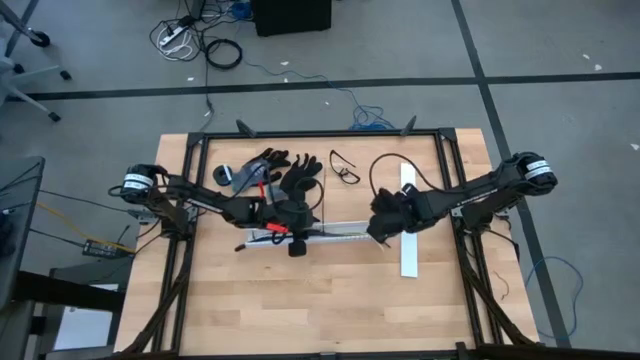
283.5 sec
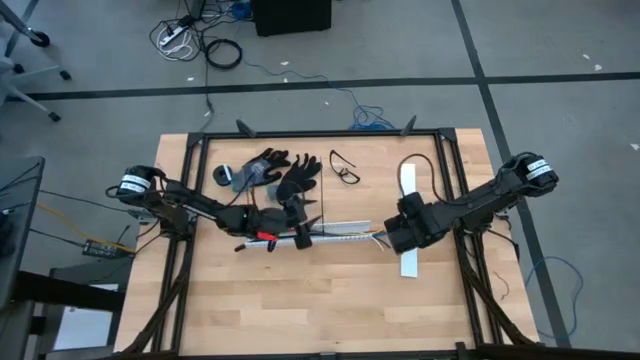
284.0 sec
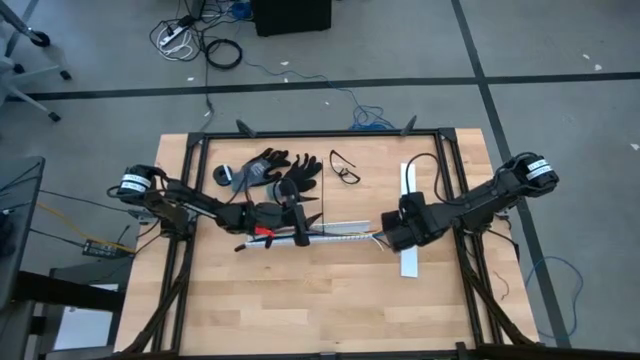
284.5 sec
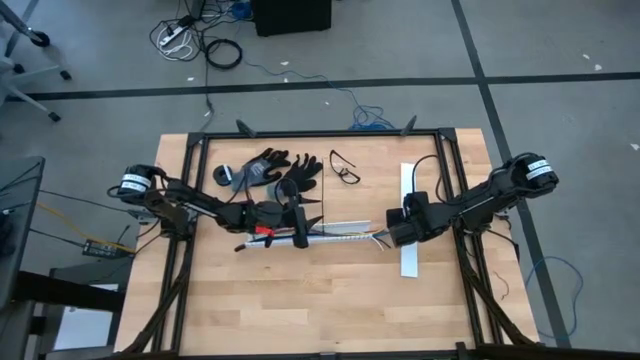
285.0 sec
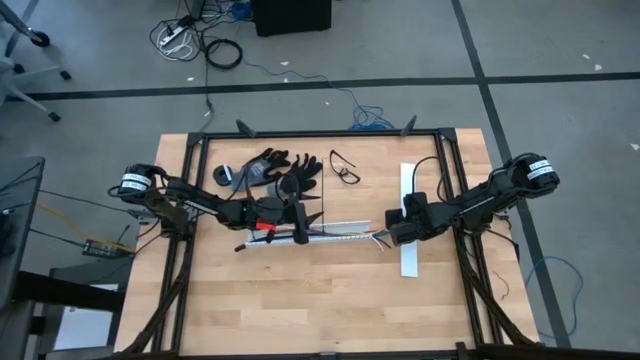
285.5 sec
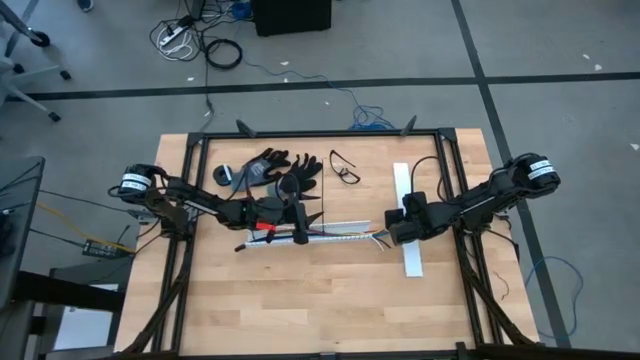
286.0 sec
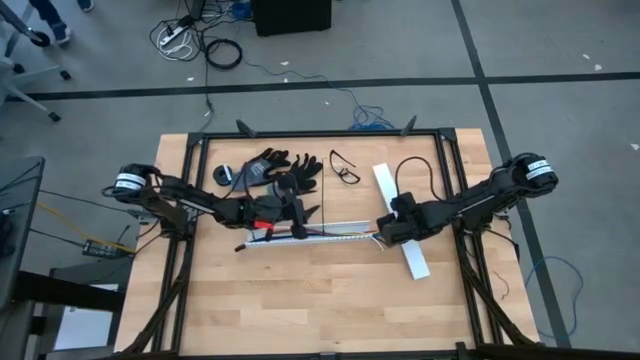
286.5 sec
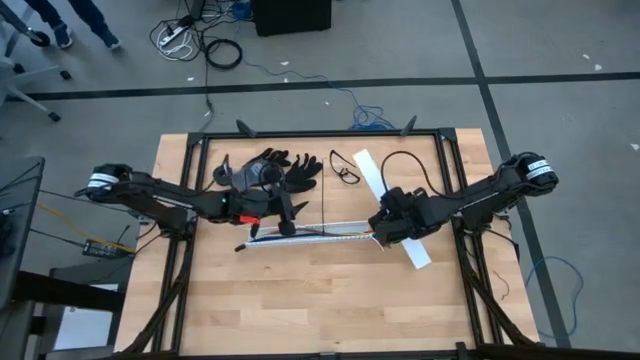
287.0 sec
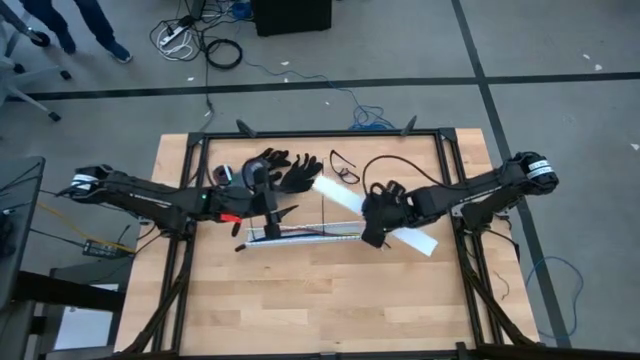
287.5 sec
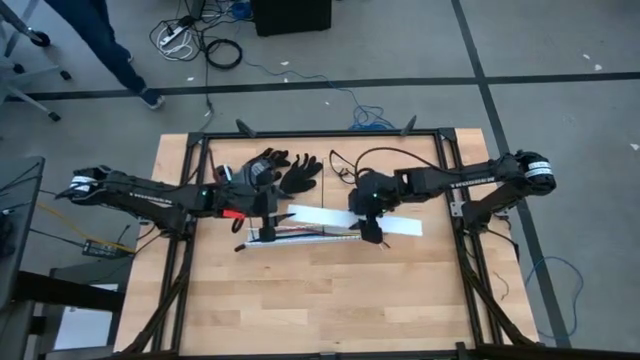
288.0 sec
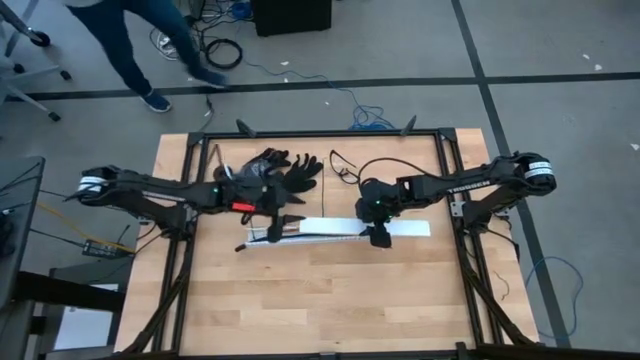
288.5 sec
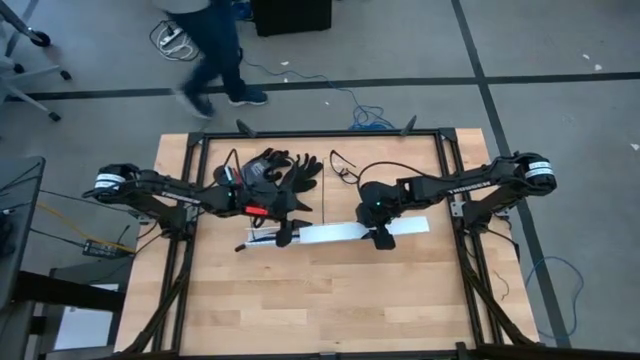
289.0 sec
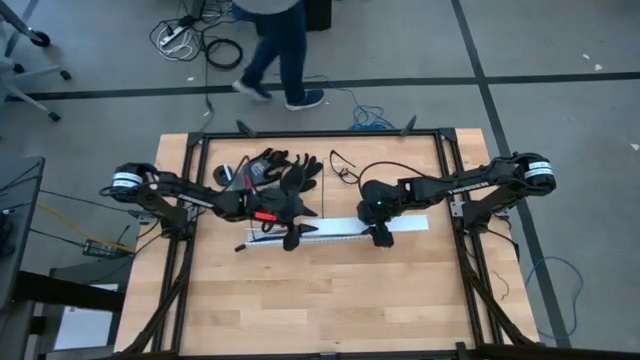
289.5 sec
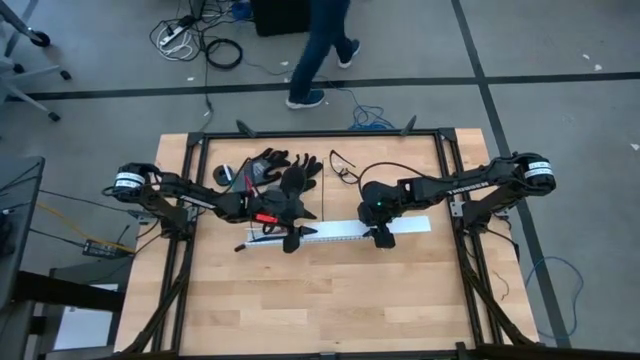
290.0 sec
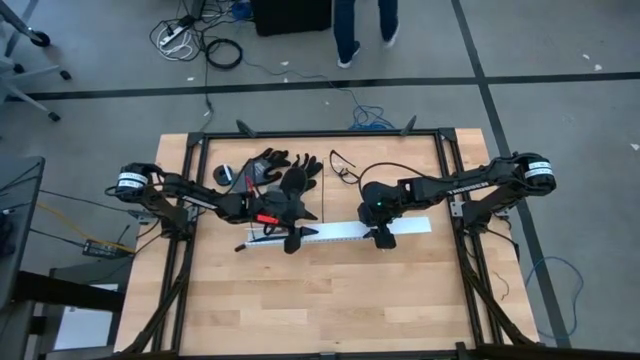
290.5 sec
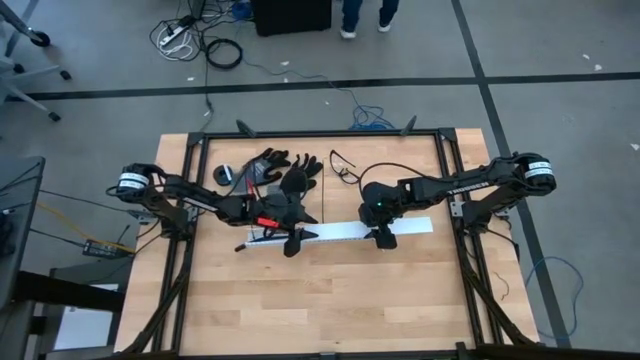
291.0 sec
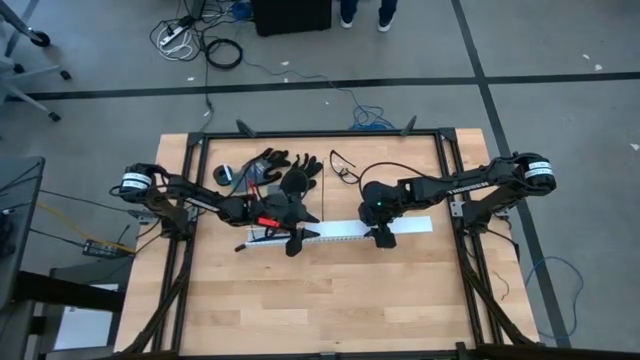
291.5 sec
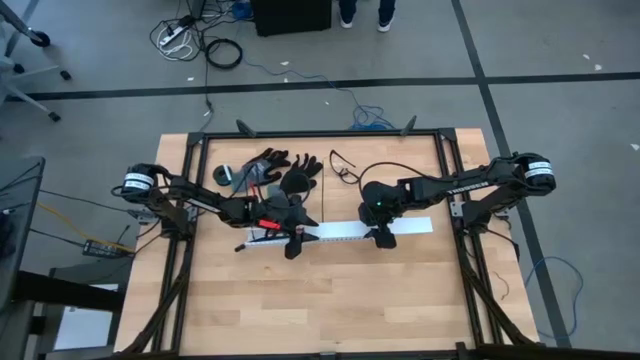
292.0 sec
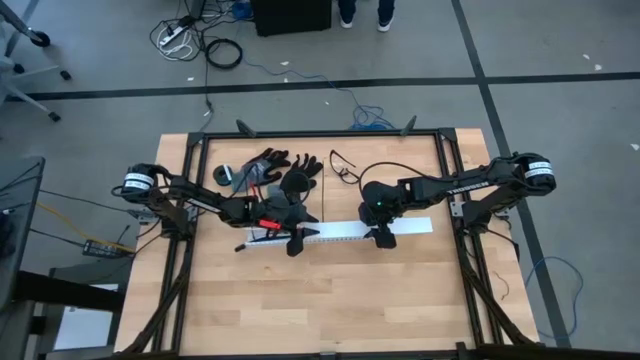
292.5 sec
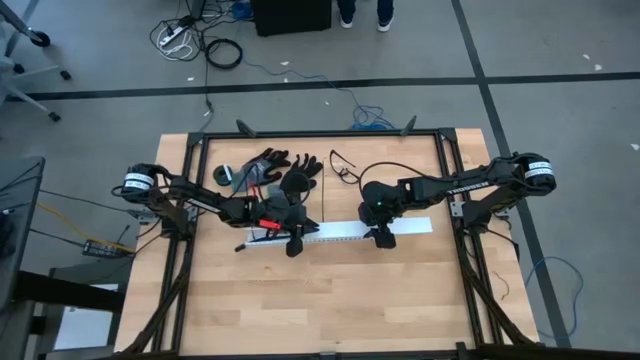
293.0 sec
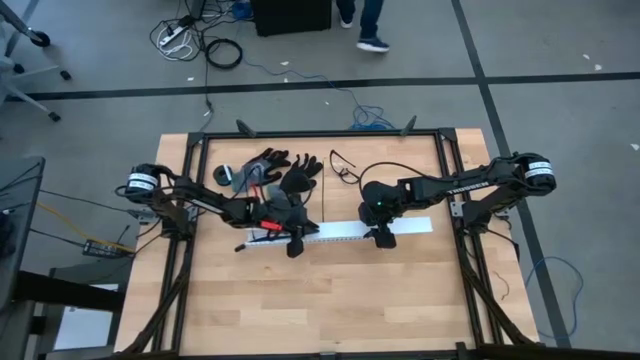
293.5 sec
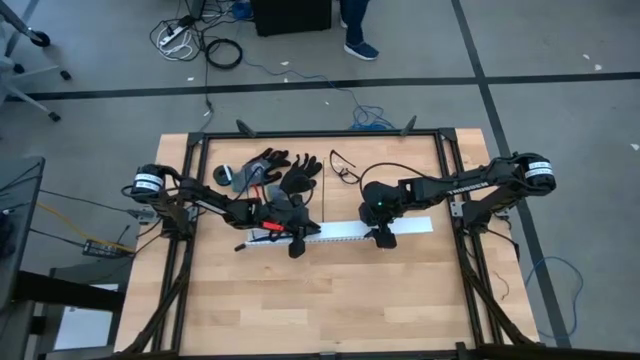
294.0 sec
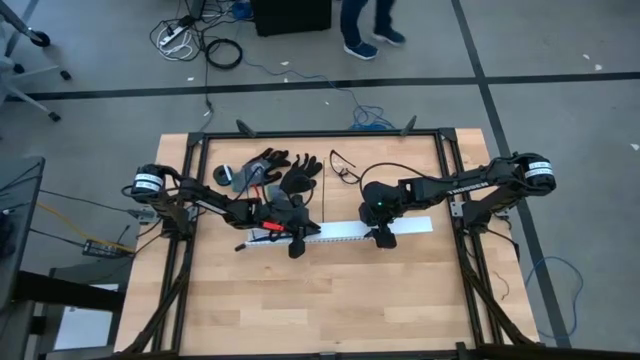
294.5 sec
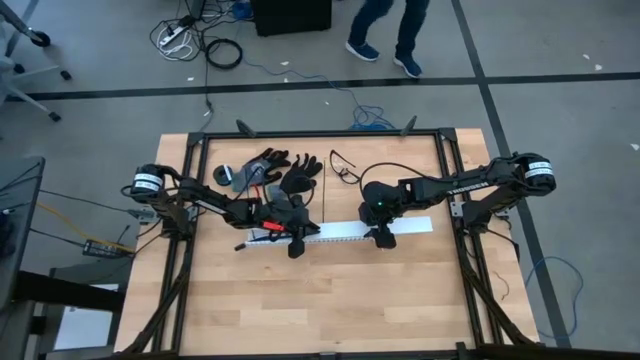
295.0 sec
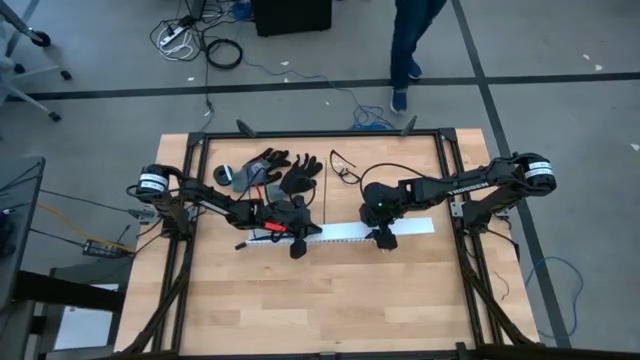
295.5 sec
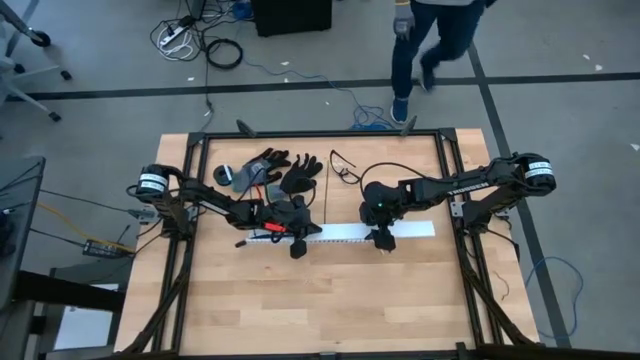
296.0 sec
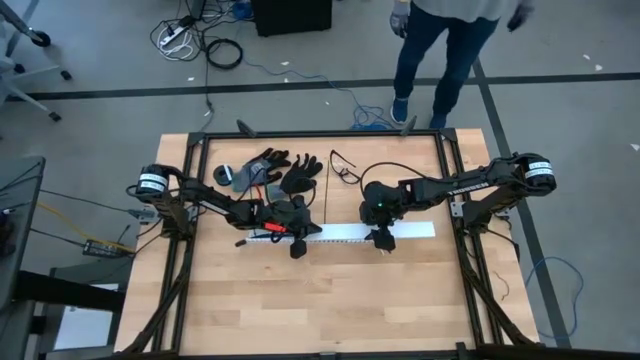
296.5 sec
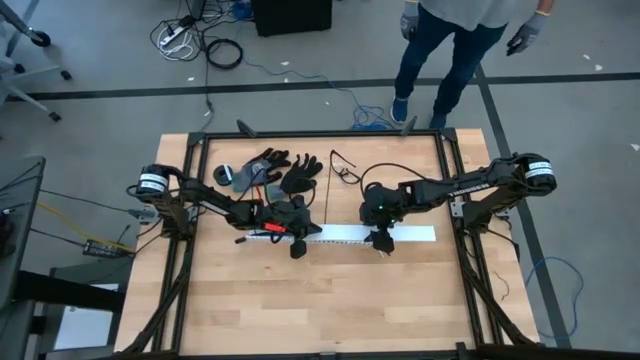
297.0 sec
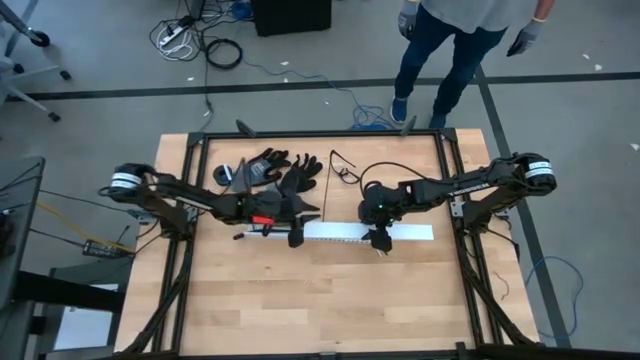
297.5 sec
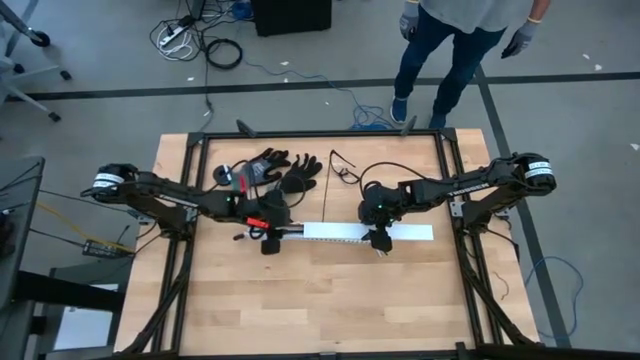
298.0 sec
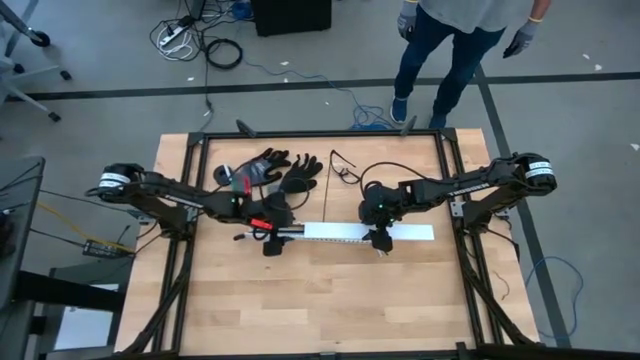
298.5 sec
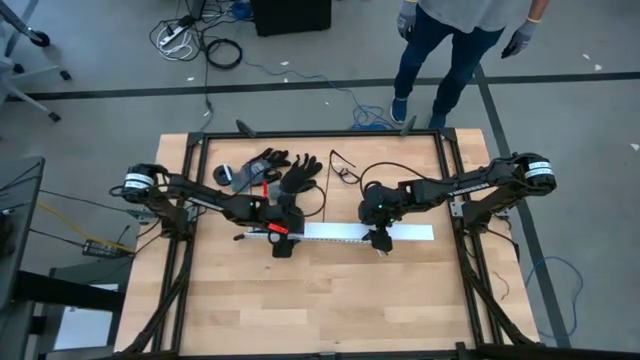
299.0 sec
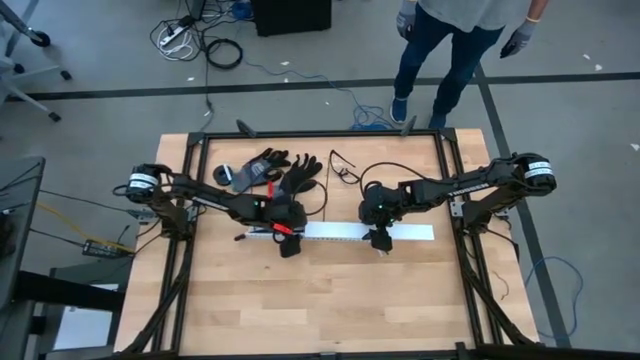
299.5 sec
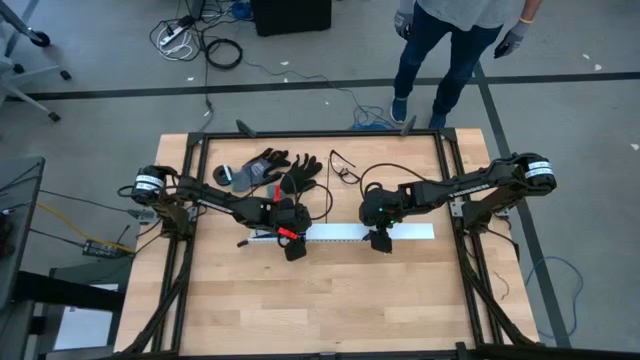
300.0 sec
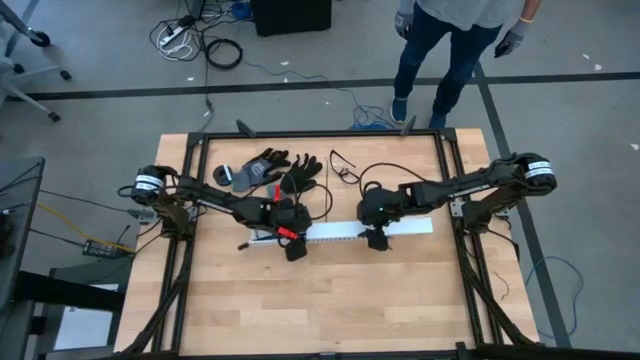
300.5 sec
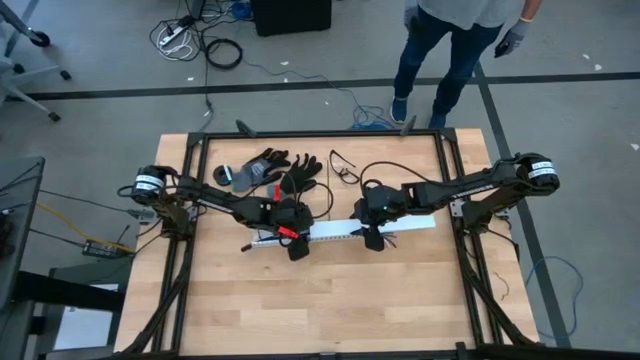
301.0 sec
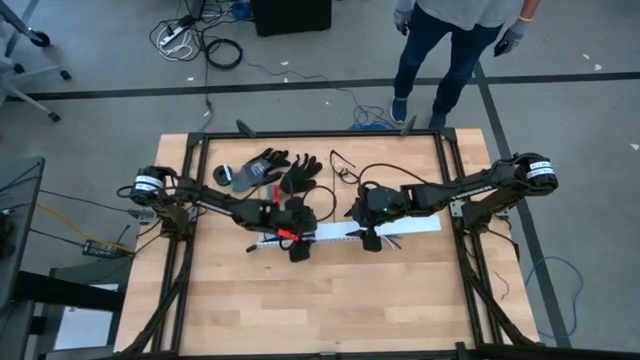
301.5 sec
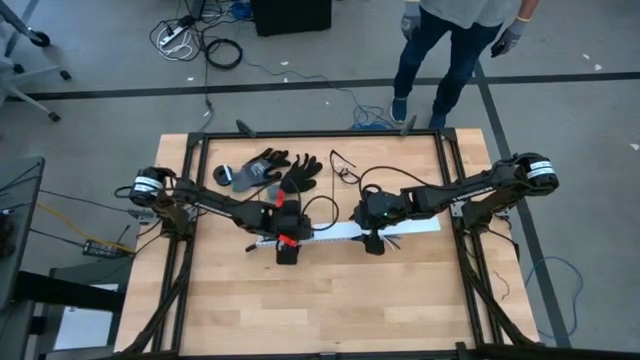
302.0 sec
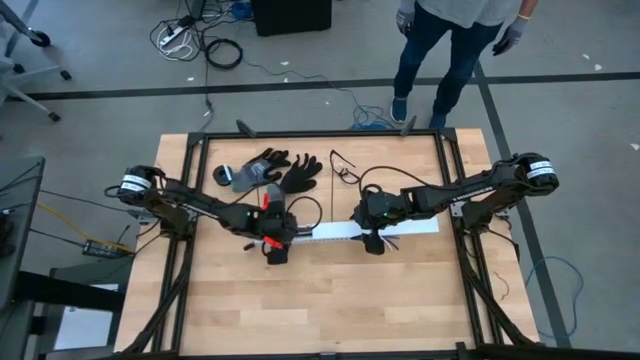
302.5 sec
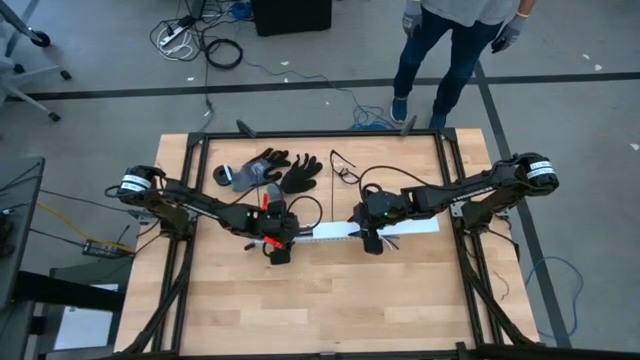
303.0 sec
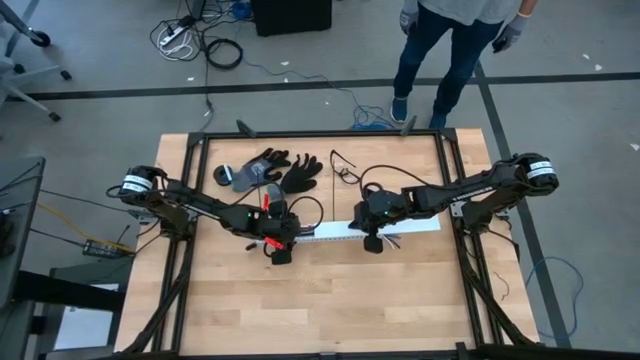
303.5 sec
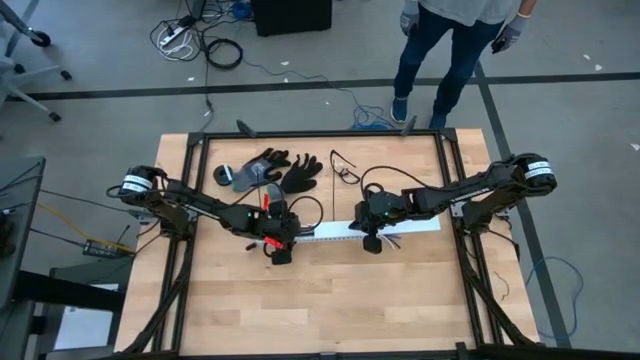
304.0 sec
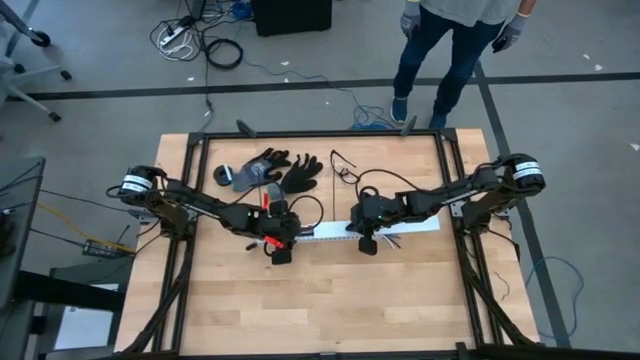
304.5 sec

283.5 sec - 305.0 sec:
Task: Ziptie cables
Close the white cable duct
